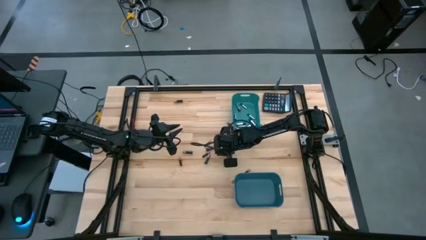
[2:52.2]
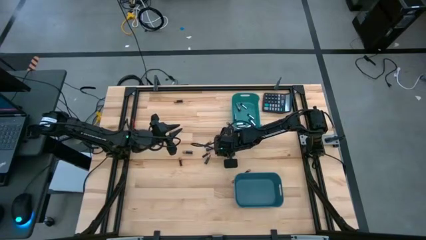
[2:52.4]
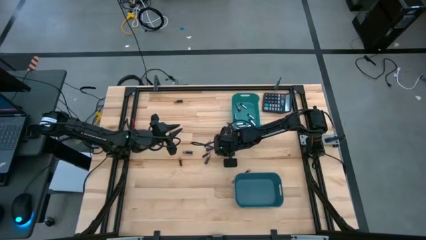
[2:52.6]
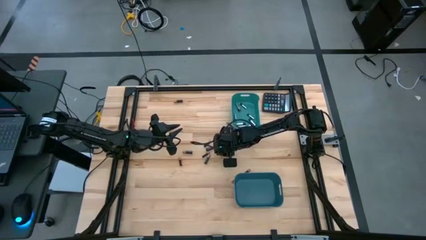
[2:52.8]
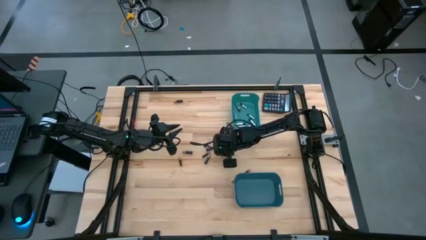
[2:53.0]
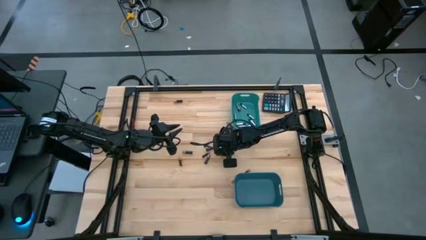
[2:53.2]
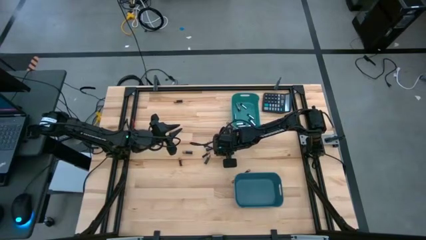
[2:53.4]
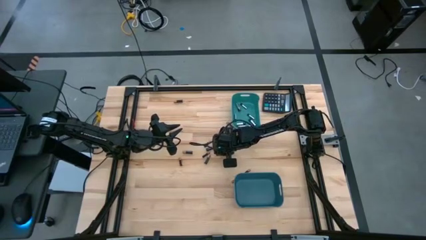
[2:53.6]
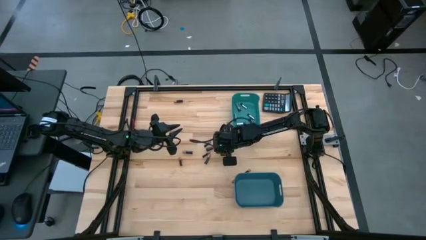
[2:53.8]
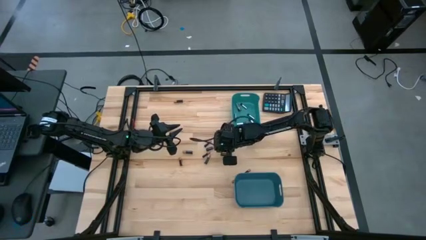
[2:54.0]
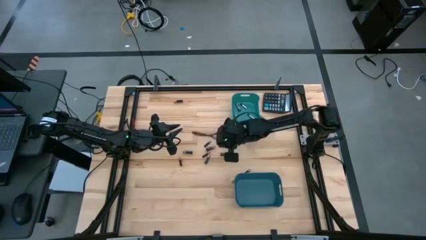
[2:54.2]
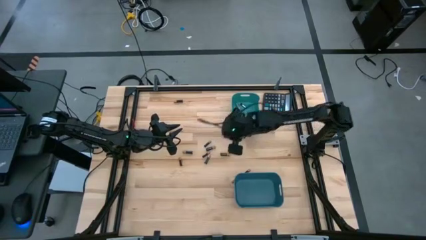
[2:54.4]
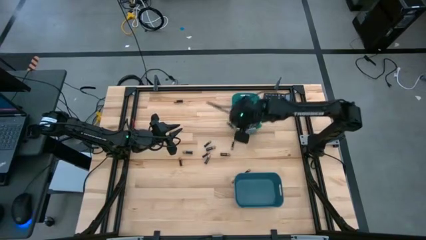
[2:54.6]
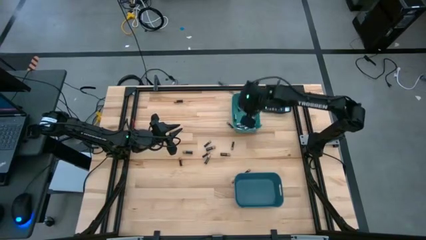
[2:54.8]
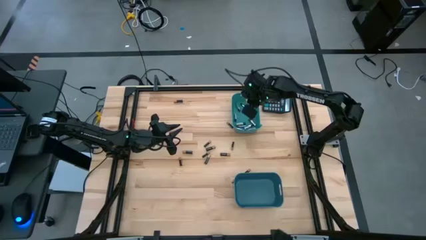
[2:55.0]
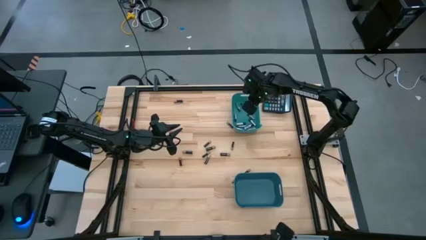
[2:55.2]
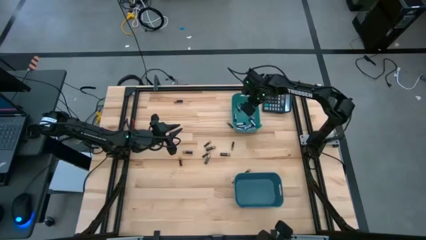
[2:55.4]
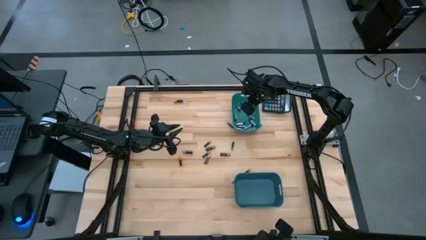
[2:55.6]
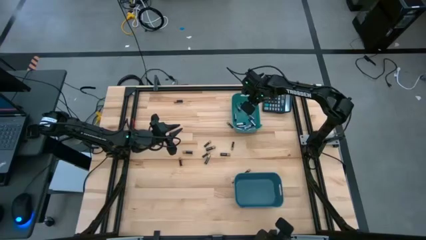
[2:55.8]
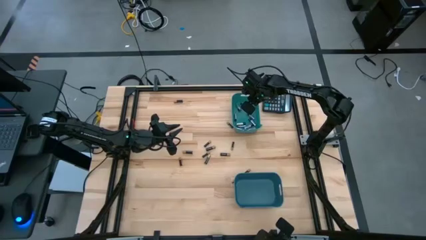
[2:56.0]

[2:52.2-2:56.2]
Task: Sort batteries
Put the silver battery into the green bin

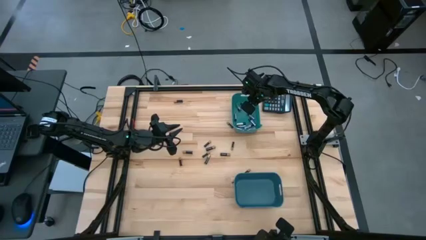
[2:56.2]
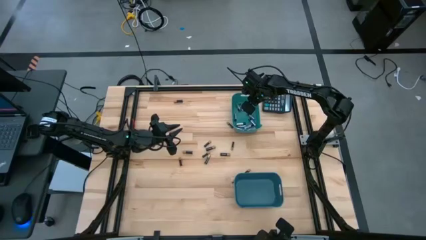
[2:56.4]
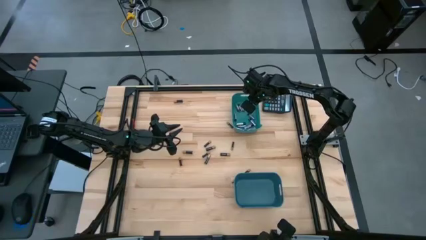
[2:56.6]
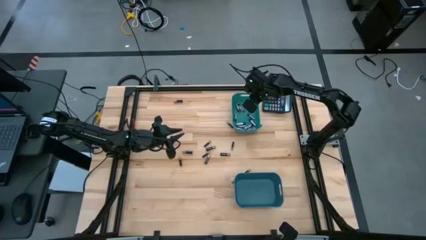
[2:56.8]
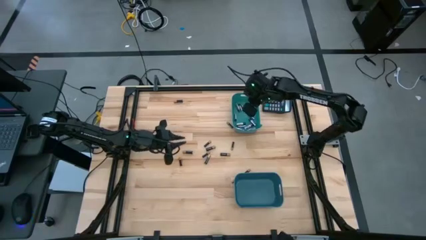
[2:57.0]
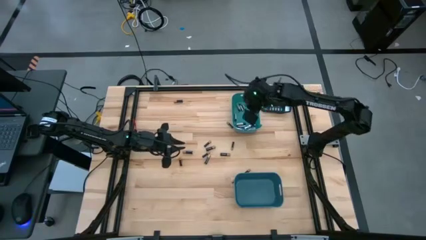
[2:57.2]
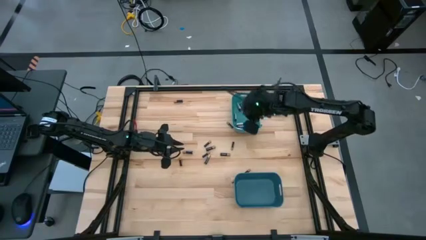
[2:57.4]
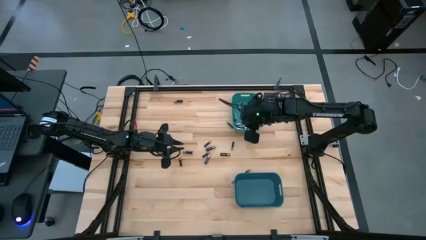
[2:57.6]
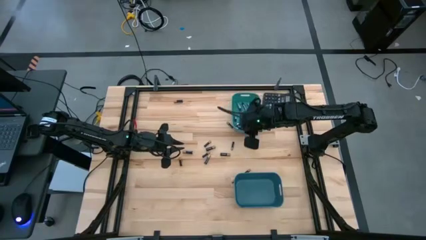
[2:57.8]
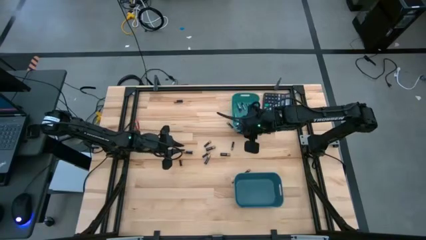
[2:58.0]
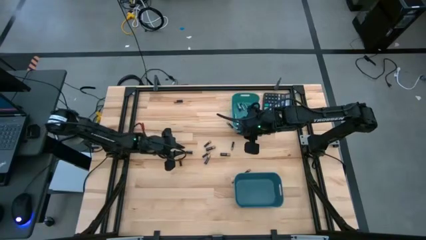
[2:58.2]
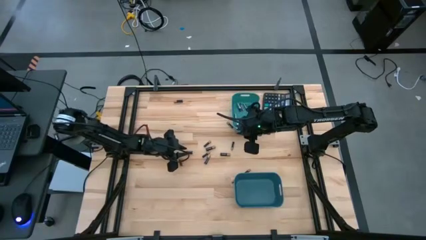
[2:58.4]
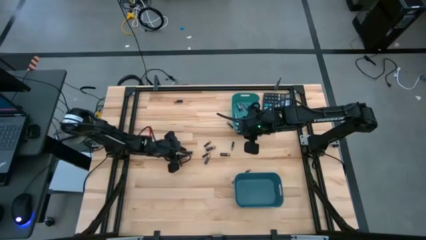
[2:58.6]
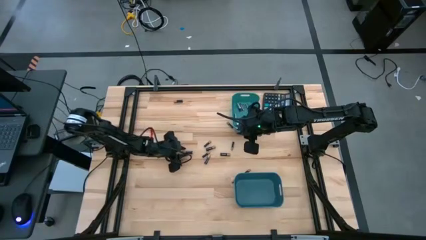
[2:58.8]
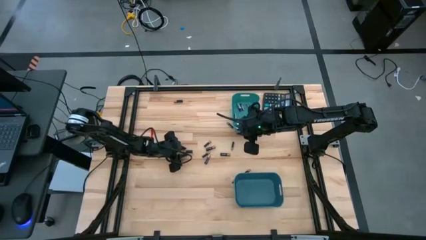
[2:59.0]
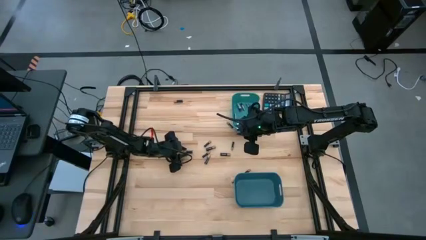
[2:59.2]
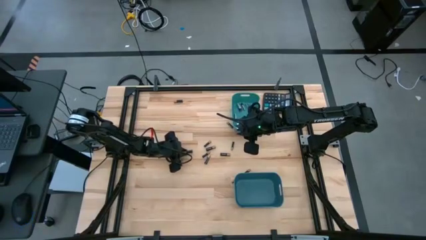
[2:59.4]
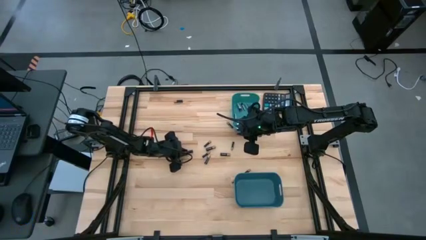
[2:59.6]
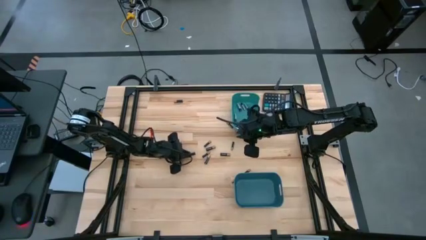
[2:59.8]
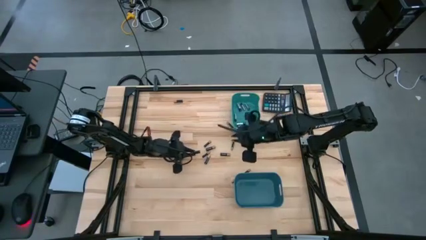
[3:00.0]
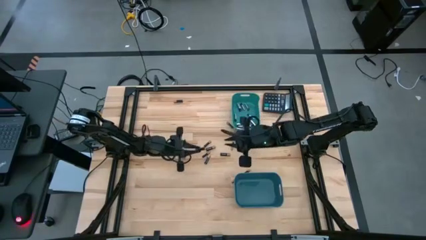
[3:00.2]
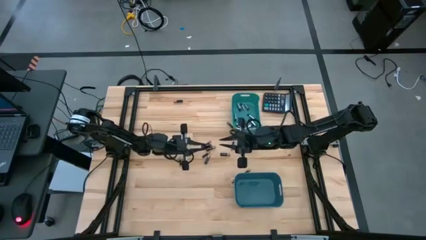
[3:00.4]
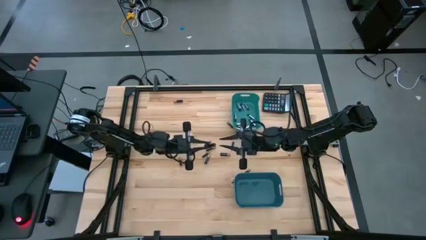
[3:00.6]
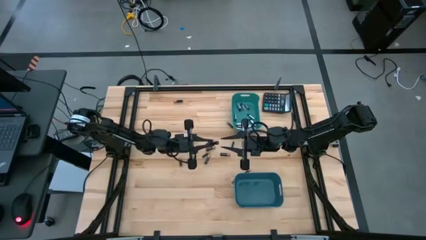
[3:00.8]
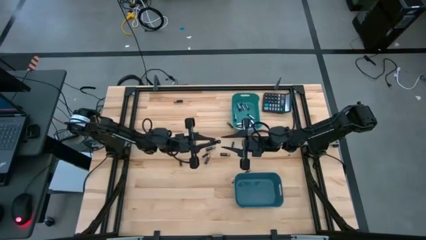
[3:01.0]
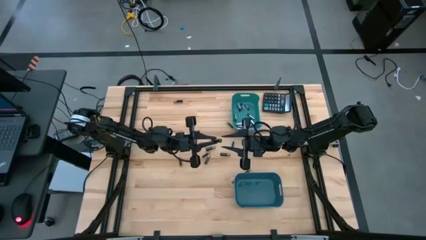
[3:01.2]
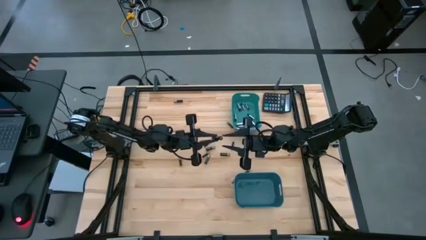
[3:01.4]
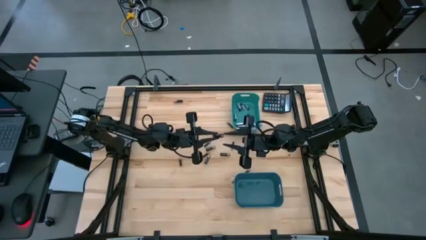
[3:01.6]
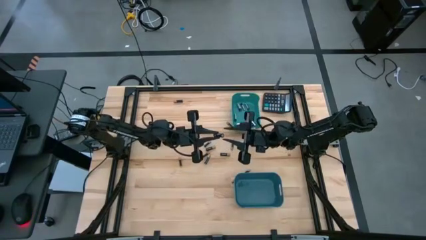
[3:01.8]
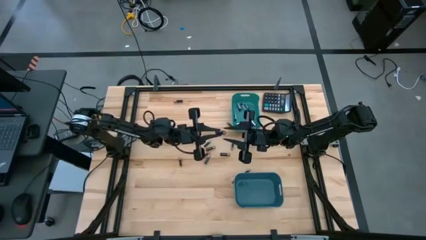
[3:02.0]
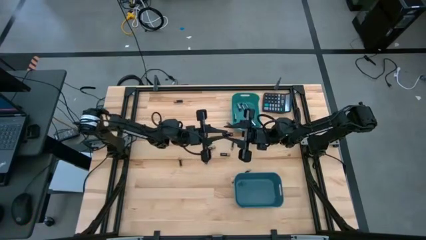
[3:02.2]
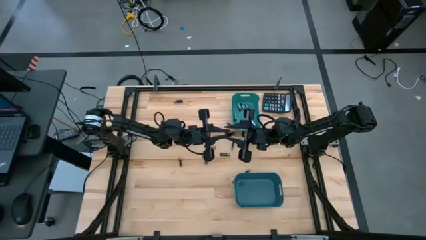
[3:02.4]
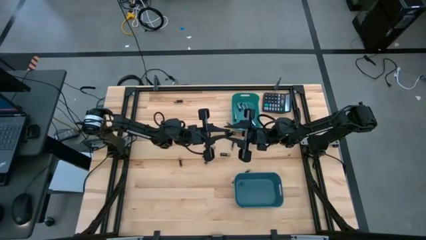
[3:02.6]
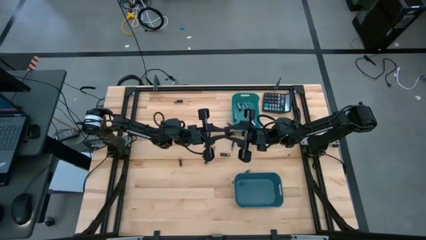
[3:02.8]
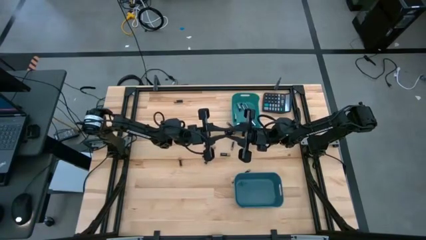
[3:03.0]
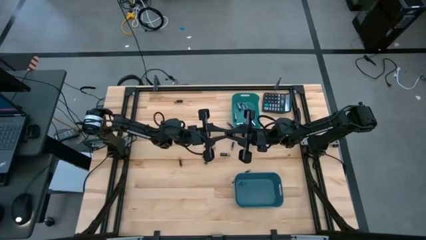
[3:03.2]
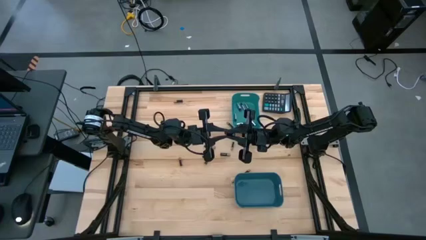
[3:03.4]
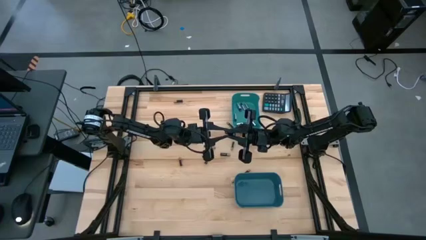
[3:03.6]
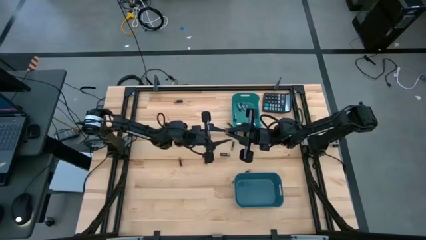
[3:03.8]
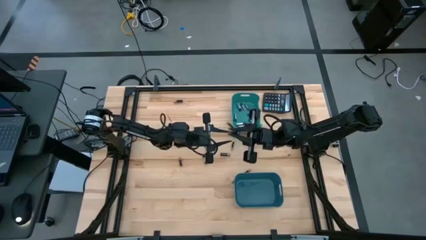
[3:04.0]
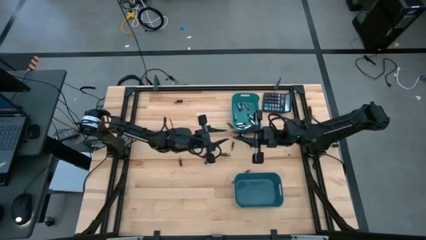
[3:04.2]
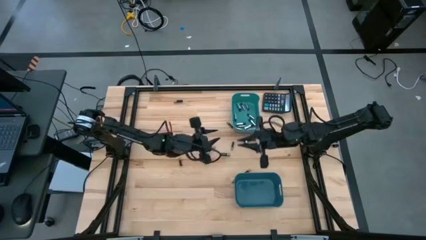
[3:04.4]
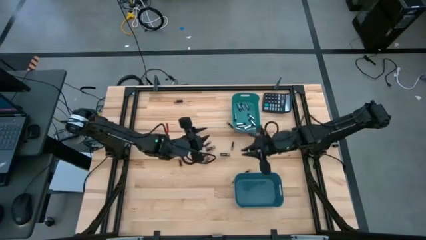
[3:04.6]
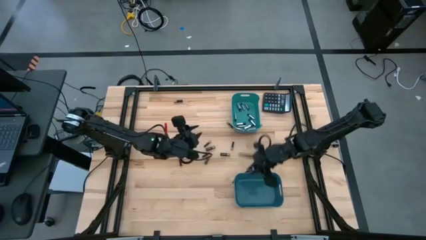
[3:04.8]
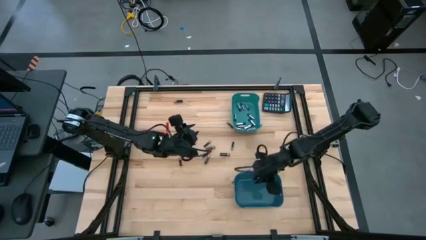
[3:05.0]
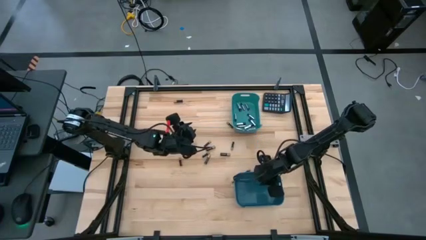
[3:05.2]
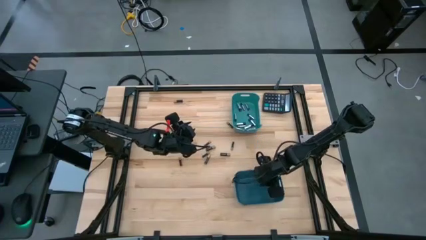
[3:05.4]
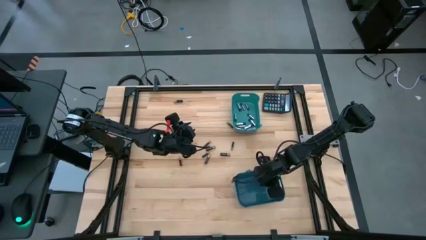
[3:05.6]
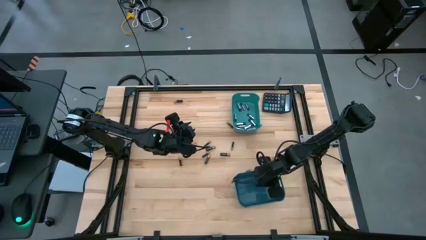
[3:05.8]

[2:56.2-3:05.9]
Put the black battery into the blue bin

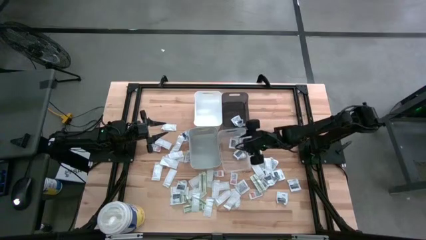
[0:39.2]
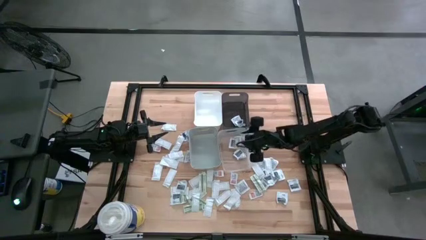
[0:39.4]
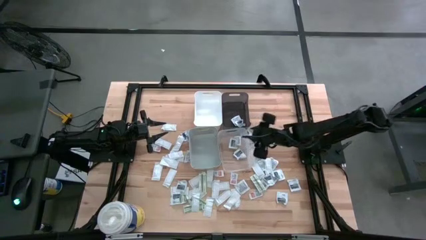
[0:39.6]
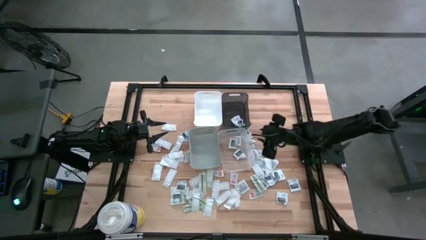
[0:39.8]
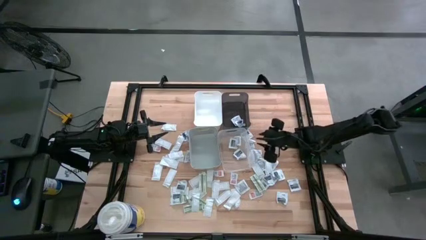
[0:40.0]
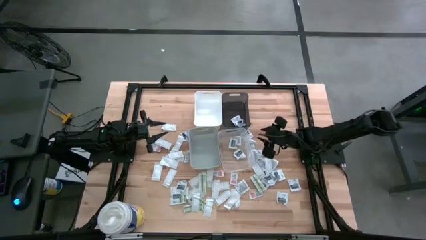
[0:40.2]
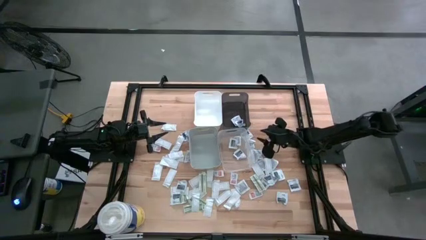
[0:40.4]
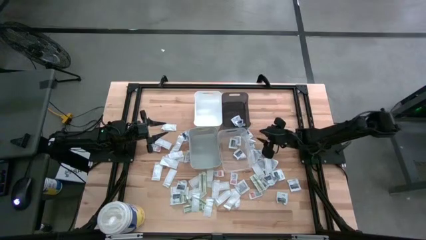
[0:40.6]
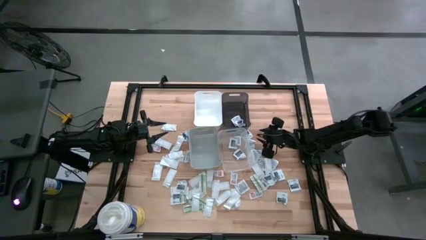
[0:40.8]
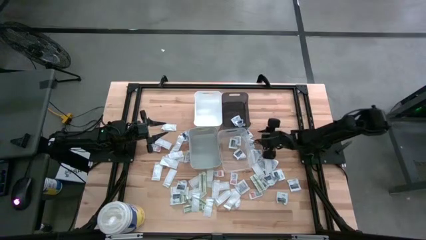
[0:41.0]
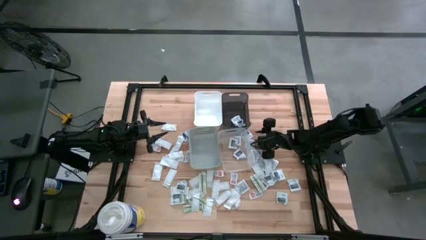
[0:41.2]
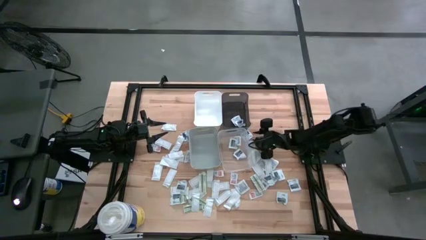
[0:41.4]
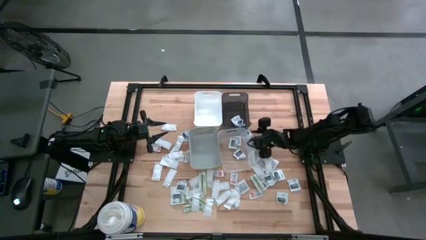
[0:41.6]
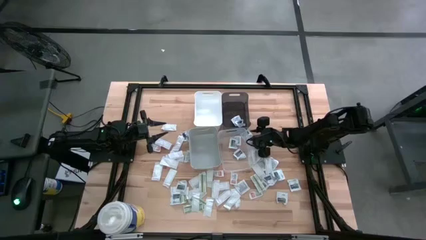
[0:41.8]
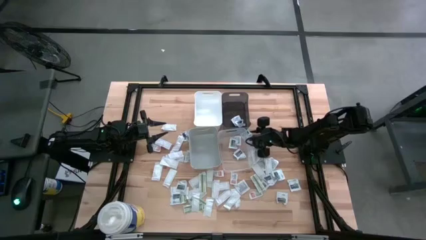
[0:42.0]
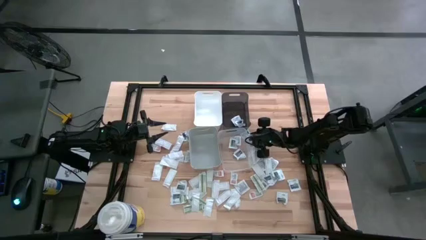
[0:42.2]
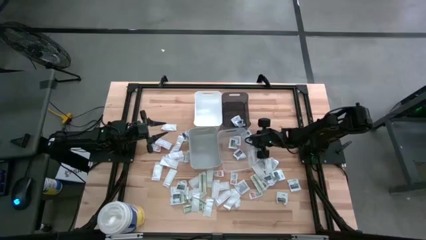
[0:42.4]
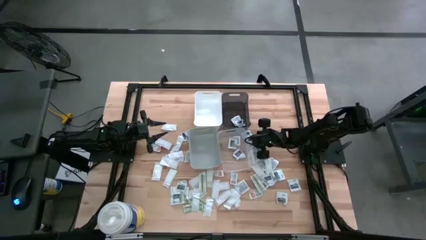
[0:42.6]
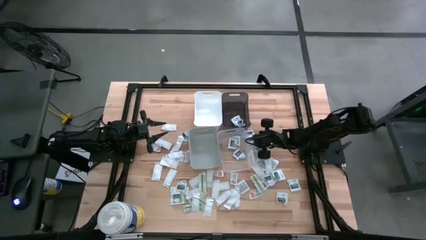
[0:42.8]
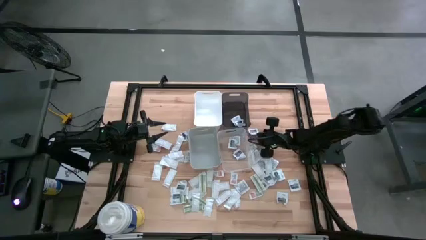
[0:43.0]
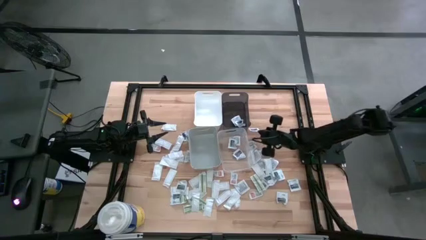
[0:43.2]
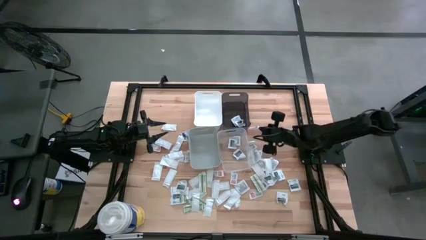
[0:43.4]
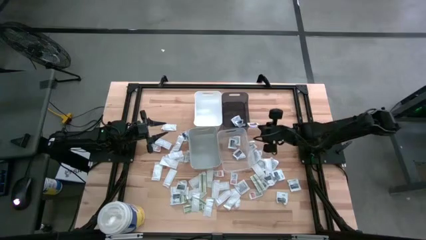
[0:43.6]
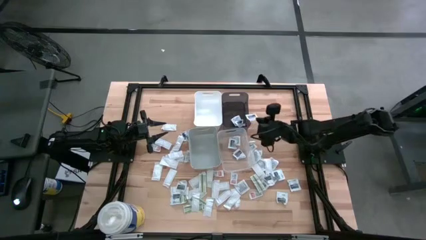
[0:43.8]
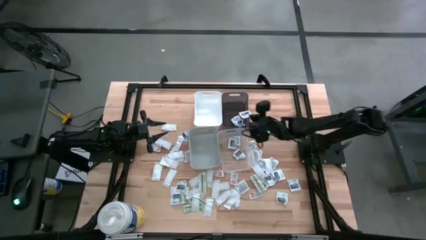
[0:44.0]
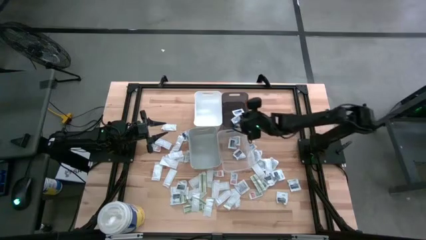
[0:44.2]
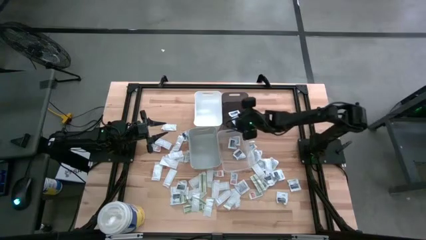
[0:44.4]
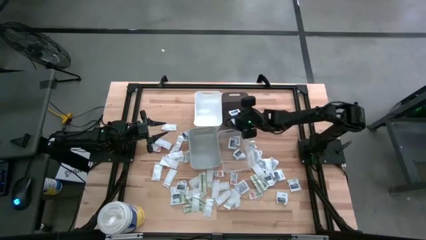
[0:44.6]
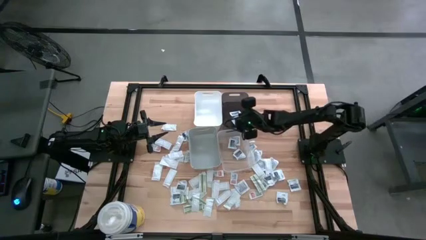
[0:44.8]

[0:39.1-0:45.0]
Task: Pick & Place First Aid Supplies
Put the blue alcohol pad into the black bin
